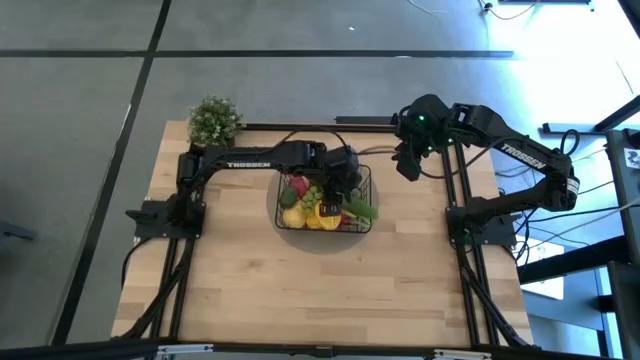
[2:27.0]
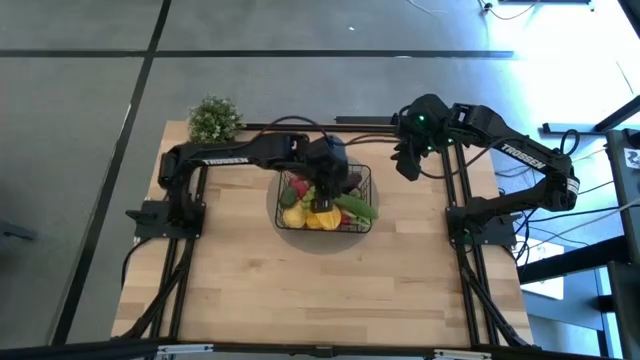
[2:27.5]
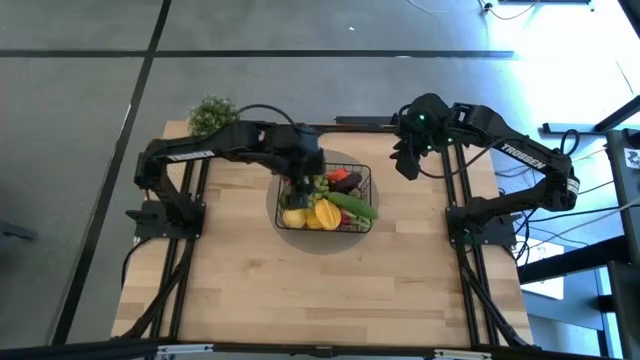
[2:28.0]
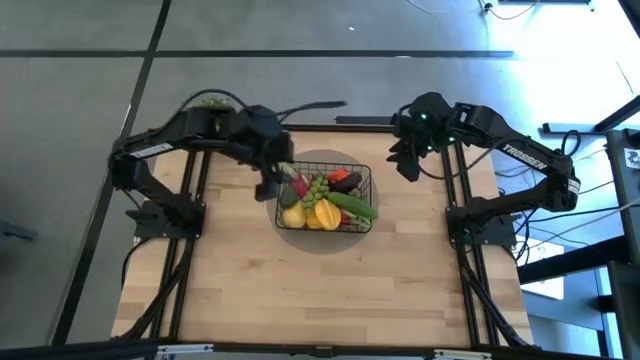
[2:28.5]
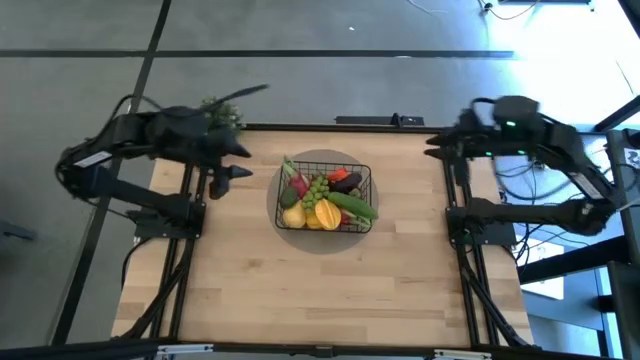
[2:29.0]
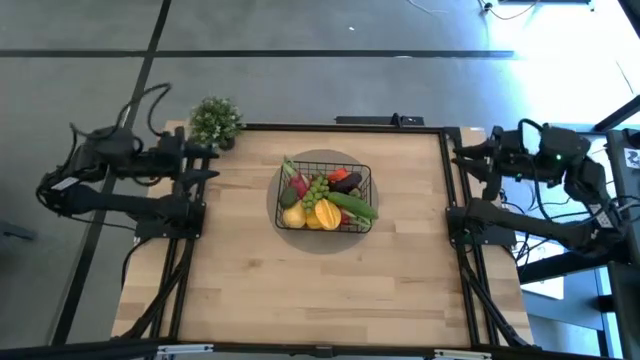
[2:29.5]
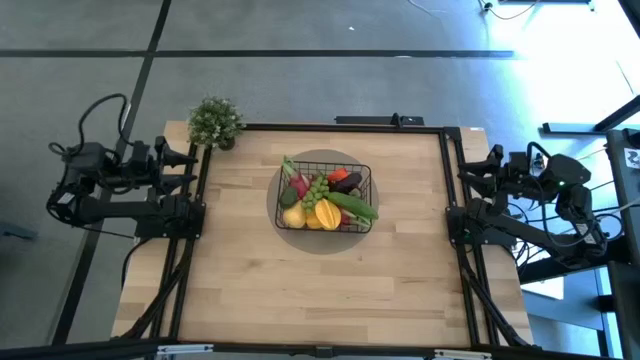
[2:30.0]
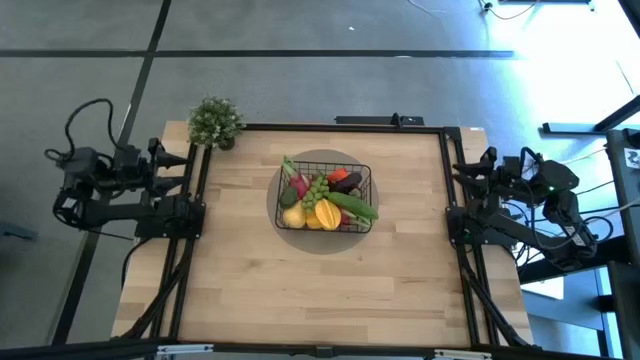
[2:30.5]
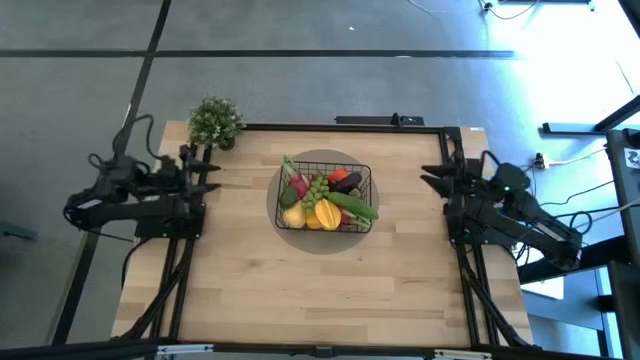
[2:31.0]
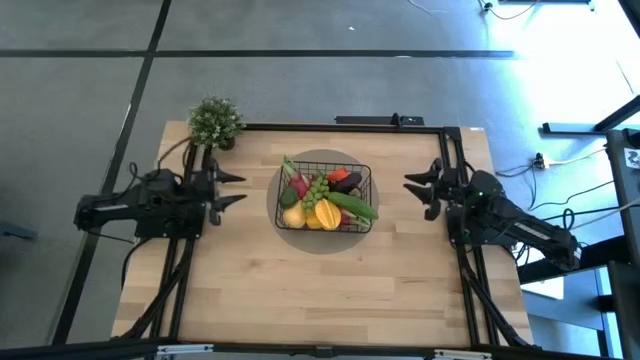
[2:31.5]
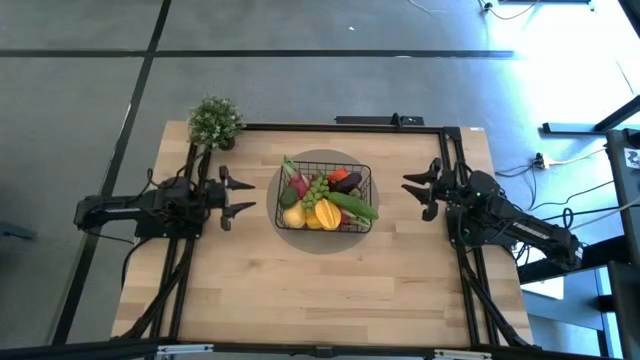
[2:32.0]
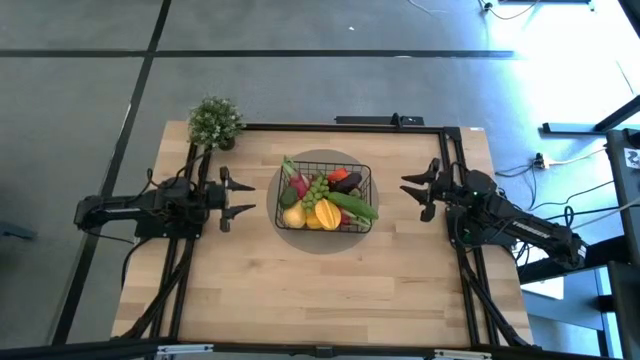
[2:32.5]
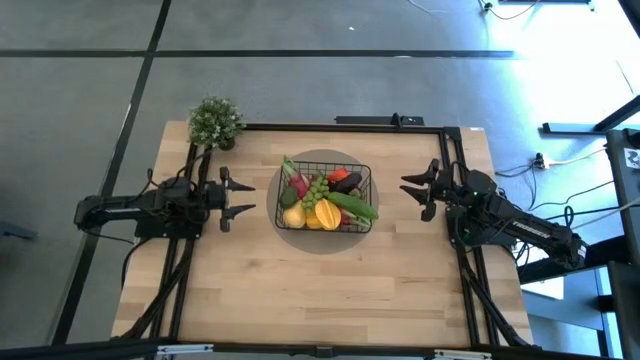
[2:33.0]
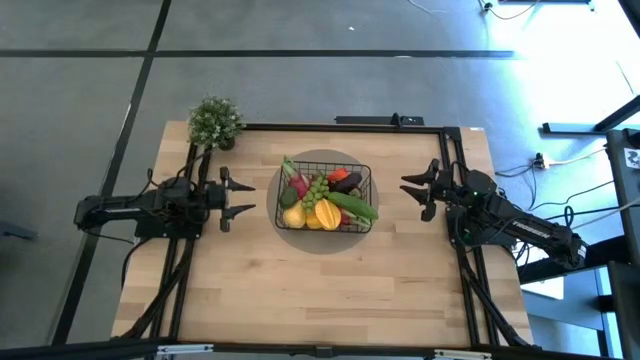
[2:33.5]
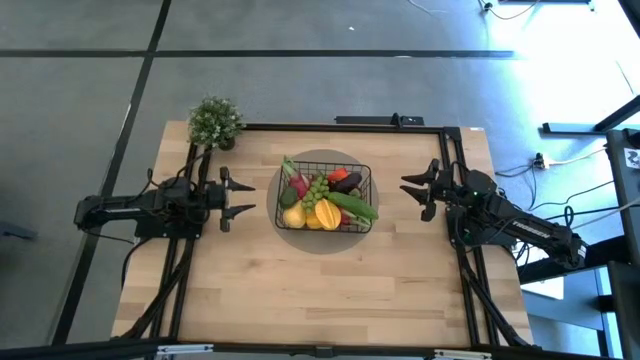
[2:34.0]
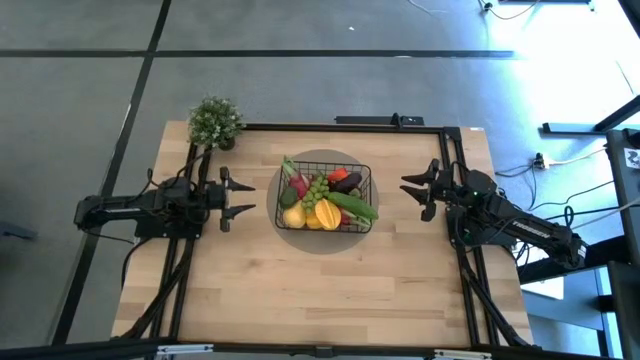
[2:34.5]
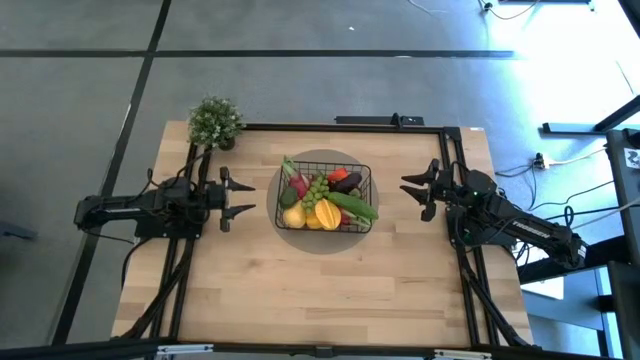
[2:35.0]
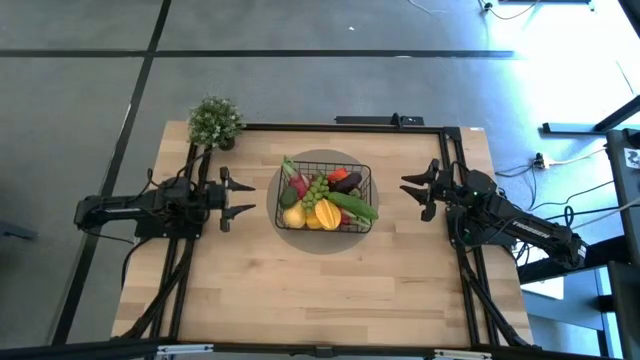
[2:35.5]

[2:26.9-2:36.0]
Task: Build produce basket
Return to Home Position

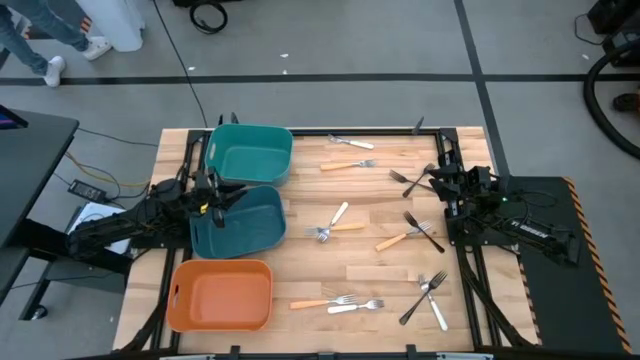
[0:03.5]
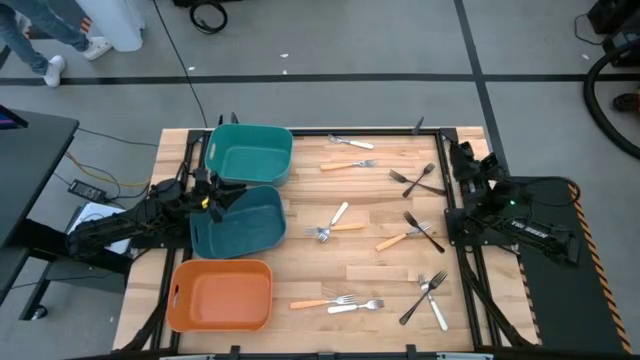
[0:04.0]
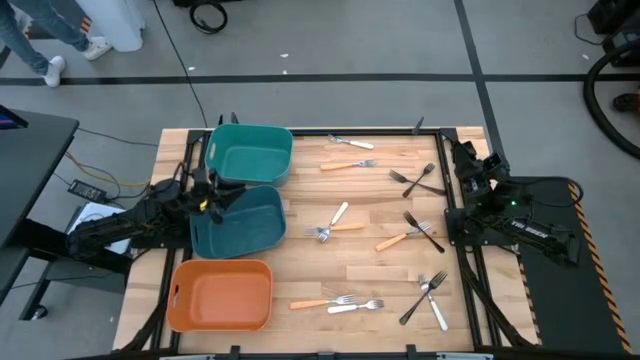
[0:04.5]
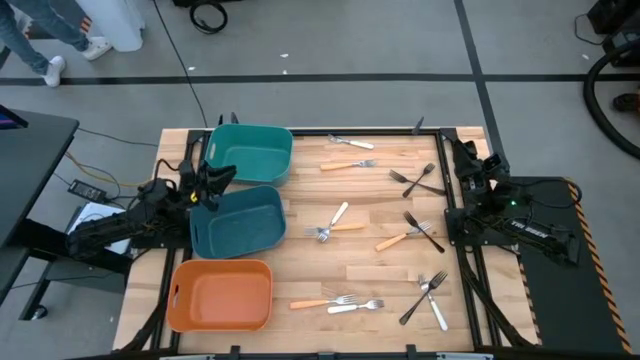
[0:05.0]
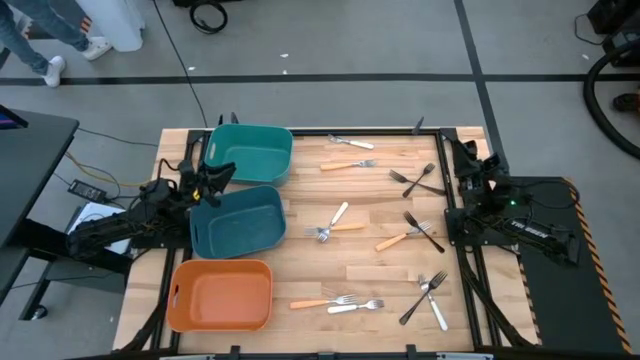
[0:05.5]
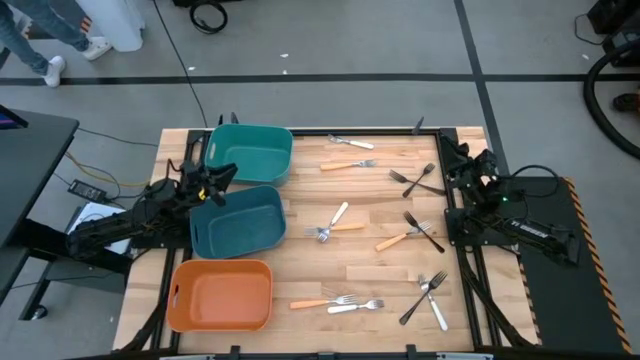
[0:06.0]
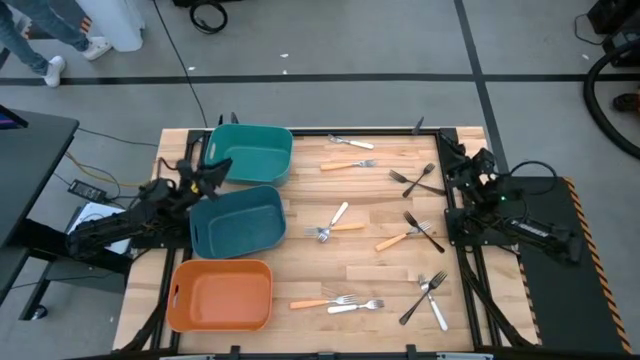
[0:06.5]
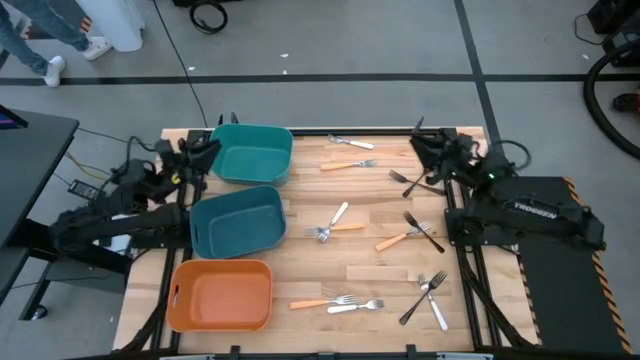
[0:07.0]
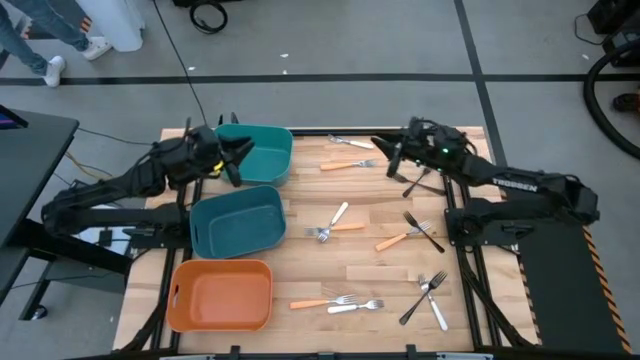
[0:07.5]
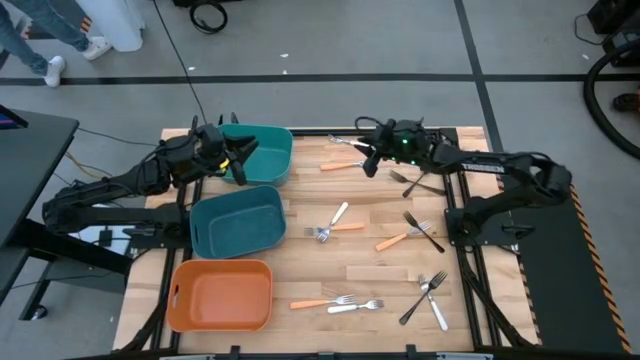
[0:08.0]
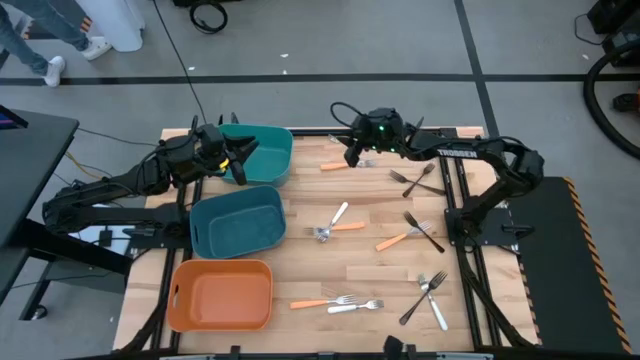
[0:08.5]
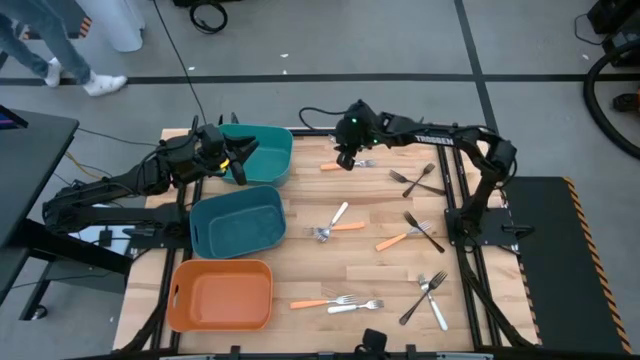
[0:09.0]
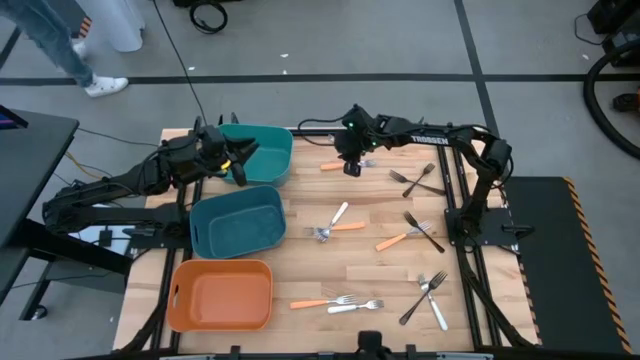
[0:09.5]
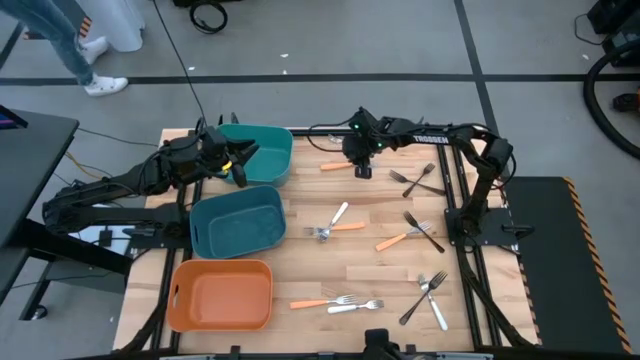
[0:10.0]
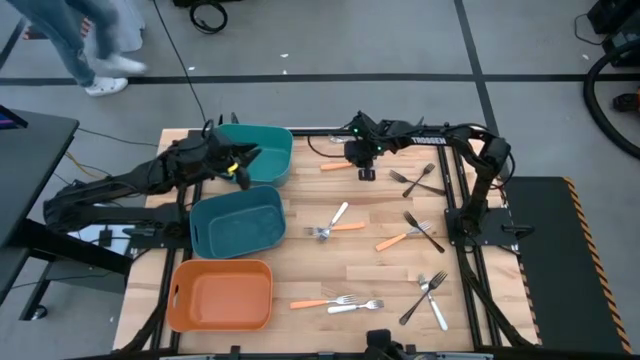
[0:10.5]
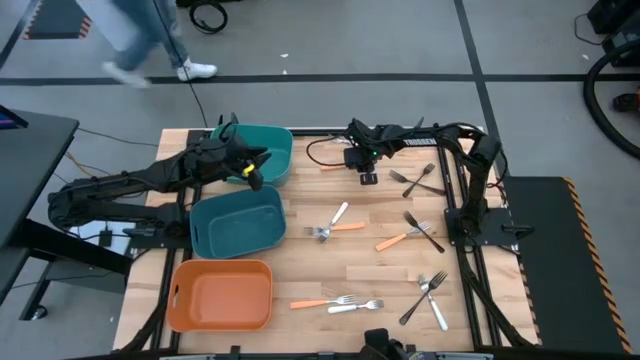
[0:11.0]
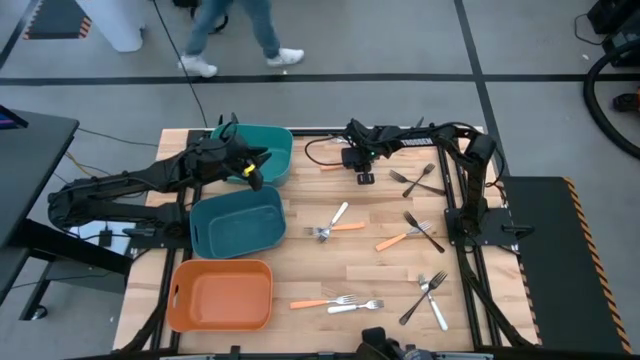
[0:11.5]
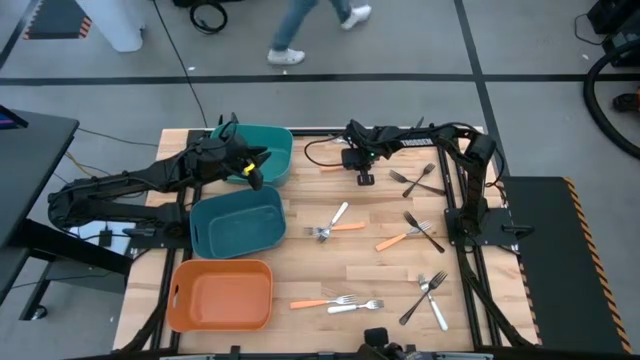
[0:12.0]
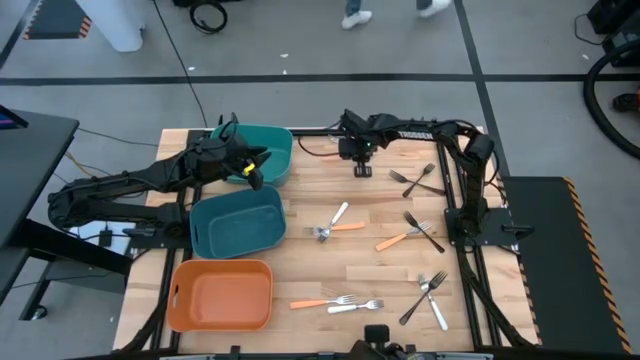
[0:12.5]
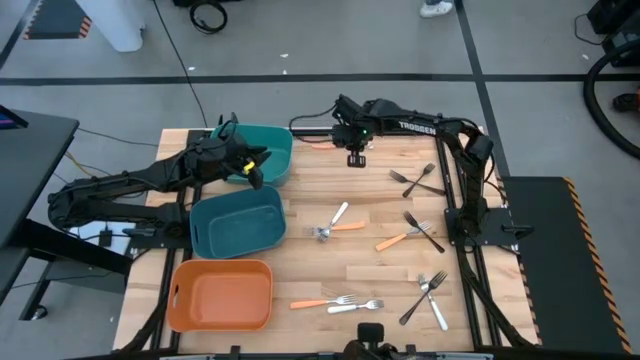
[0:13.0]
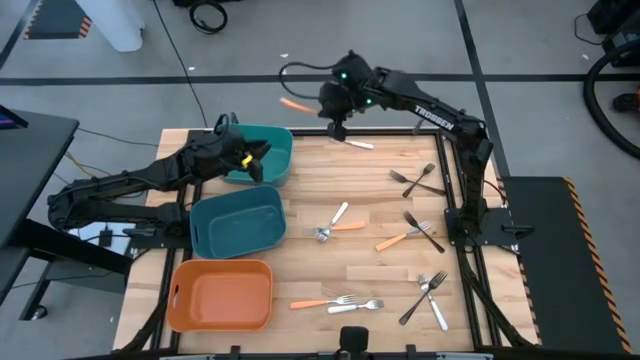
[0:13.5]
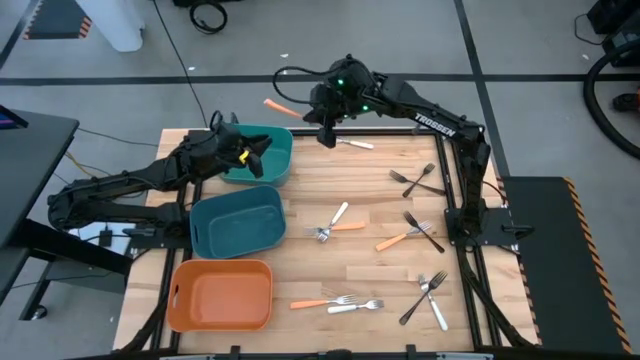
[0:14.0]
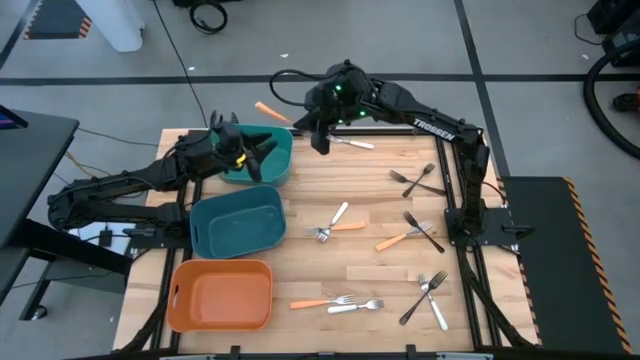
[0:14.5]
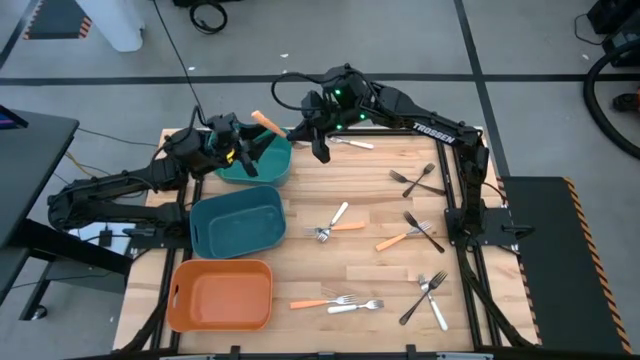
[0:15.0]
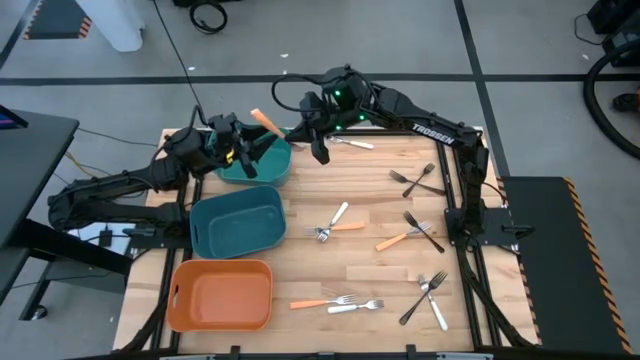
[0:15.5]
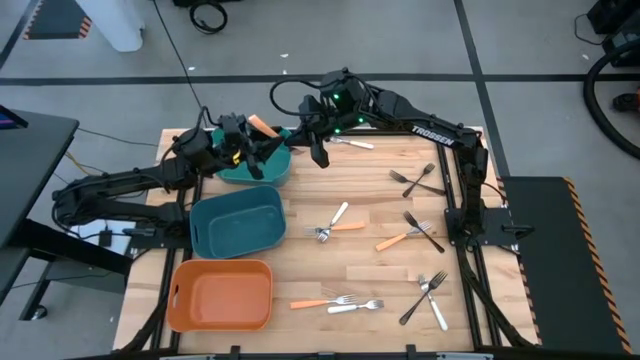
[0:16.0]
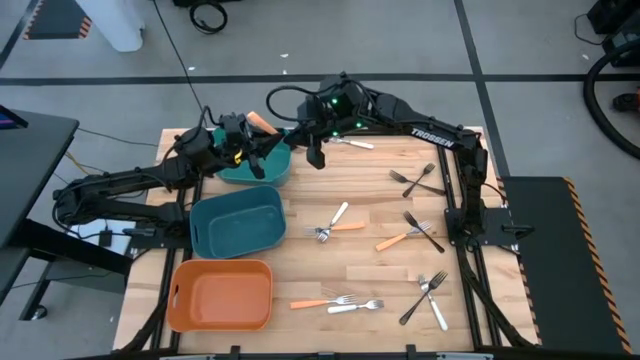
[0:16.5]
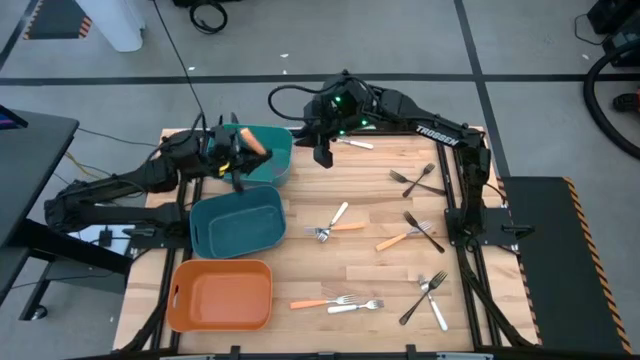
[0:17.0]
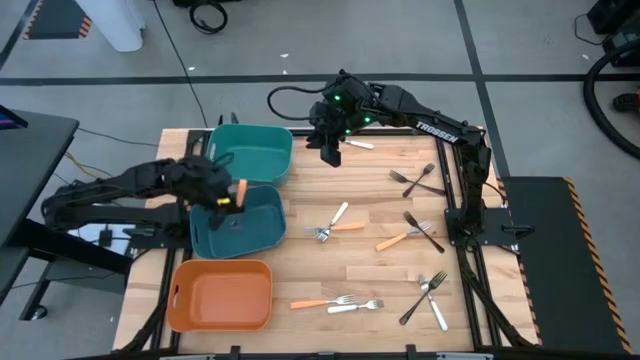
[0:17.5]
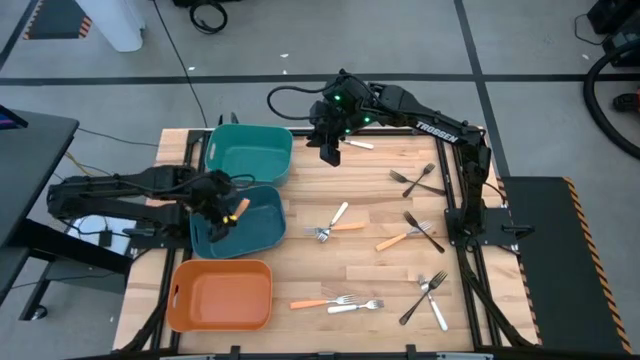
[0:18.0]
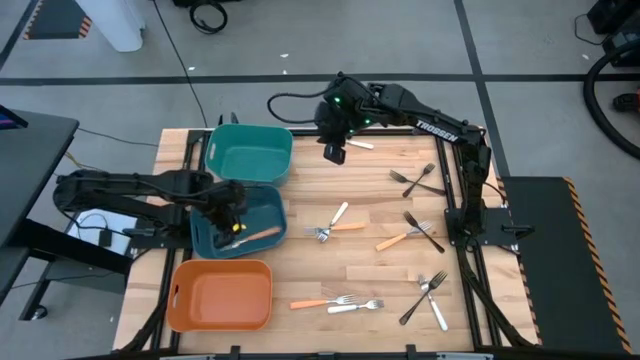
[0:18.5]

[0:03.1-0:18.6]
Task: Sort silverware by color (type)
Put the orange fork into the blue bin
